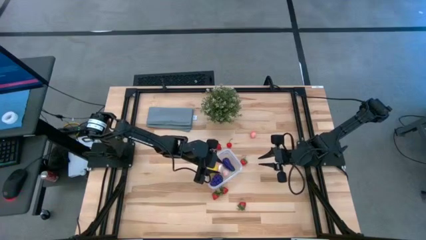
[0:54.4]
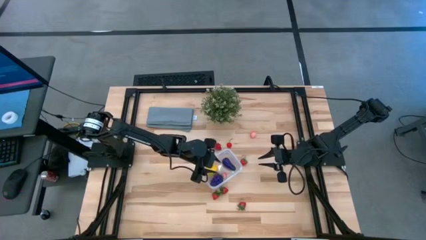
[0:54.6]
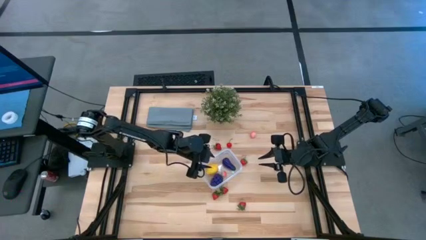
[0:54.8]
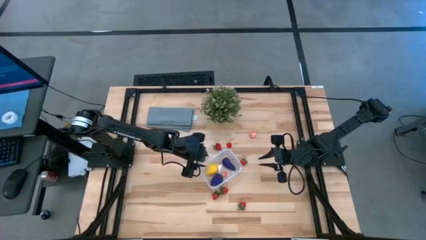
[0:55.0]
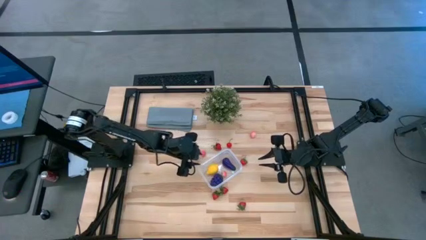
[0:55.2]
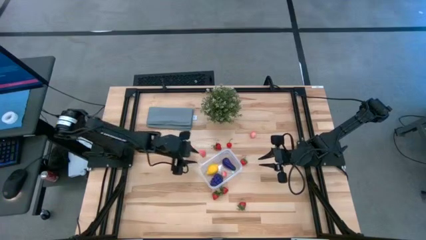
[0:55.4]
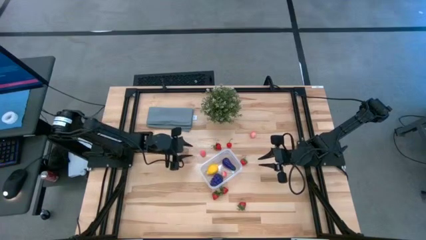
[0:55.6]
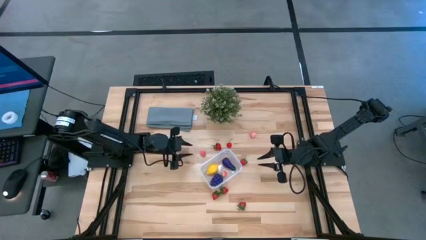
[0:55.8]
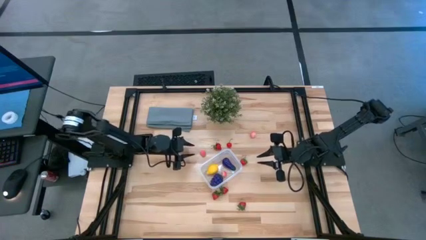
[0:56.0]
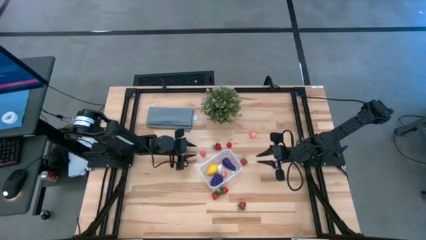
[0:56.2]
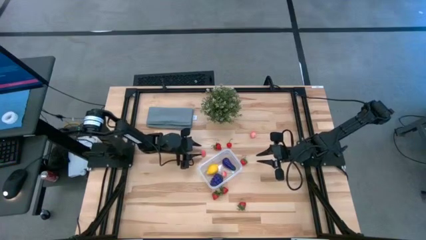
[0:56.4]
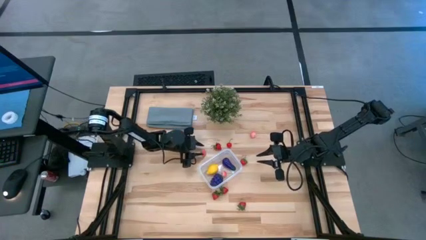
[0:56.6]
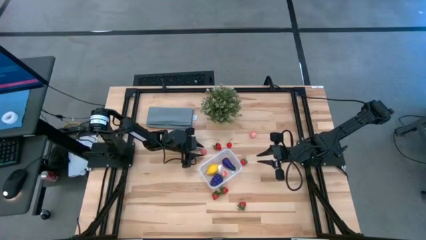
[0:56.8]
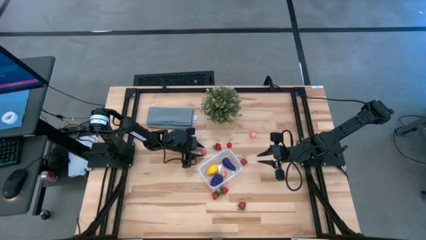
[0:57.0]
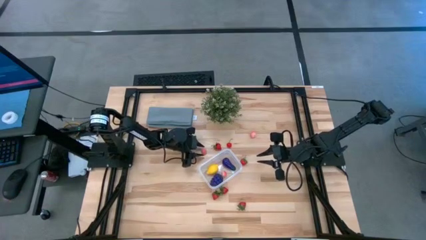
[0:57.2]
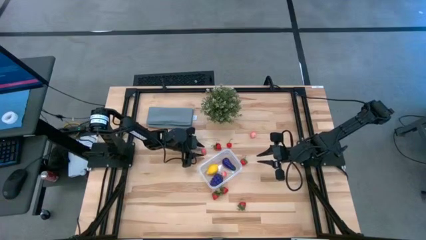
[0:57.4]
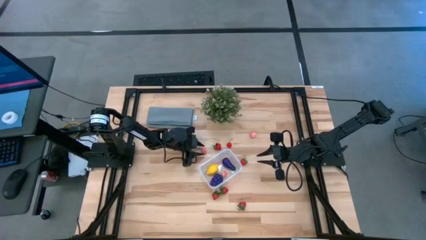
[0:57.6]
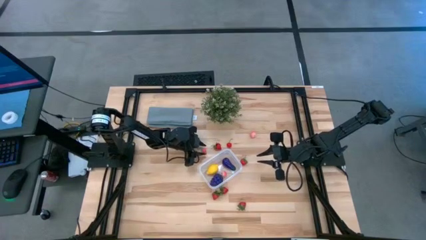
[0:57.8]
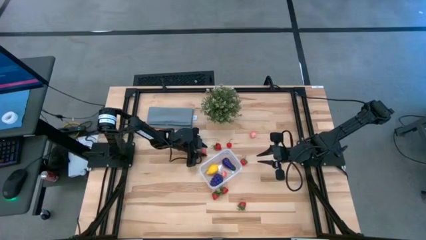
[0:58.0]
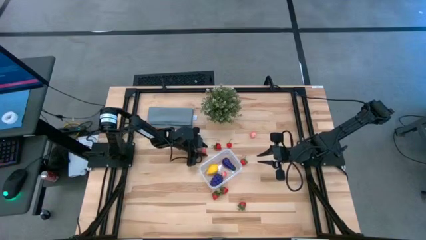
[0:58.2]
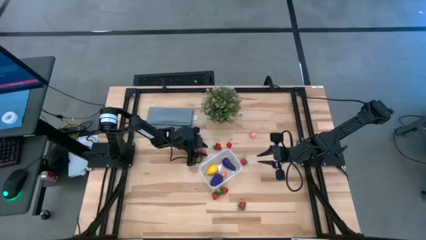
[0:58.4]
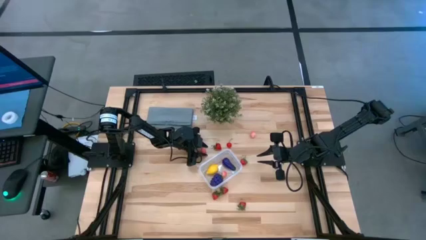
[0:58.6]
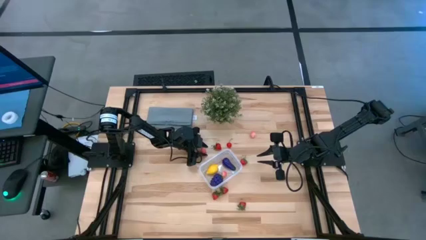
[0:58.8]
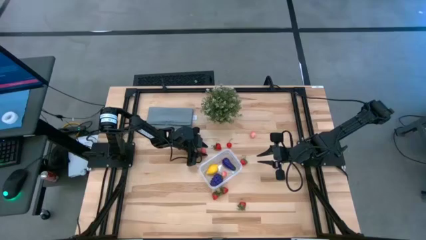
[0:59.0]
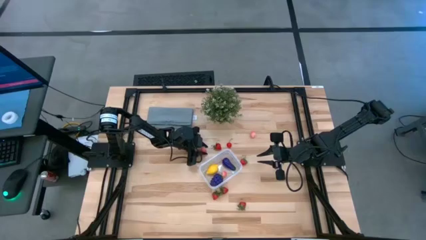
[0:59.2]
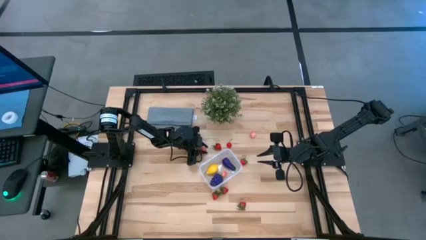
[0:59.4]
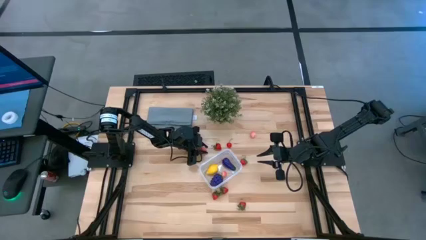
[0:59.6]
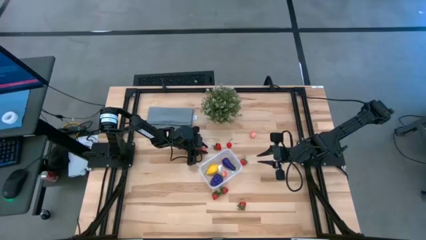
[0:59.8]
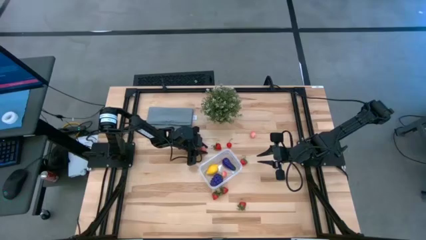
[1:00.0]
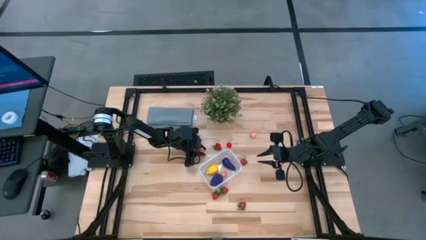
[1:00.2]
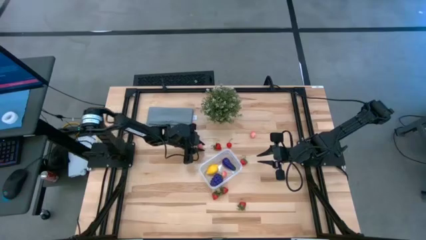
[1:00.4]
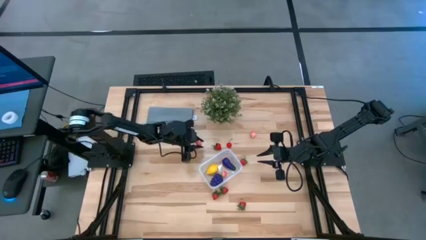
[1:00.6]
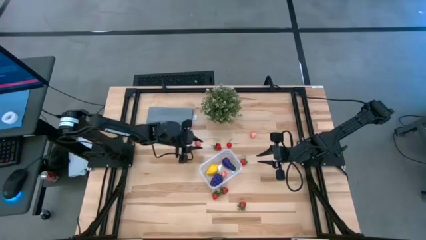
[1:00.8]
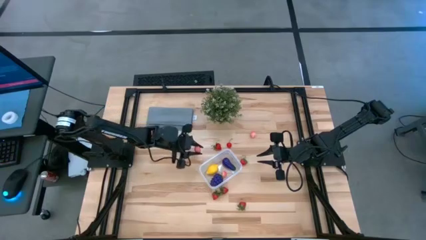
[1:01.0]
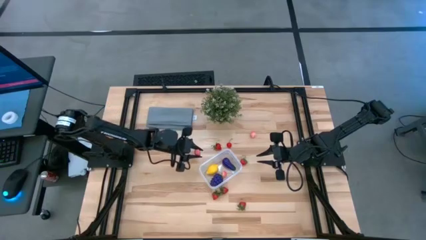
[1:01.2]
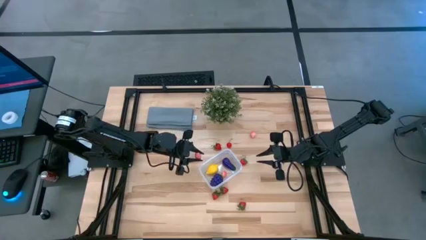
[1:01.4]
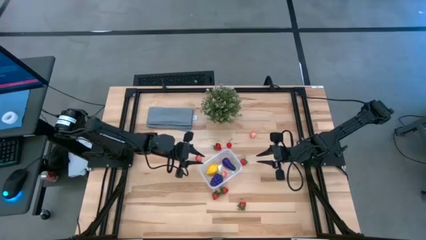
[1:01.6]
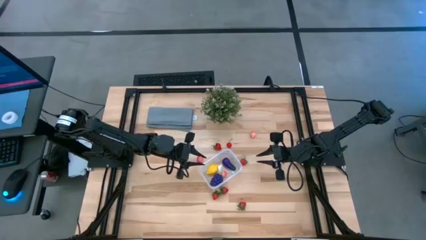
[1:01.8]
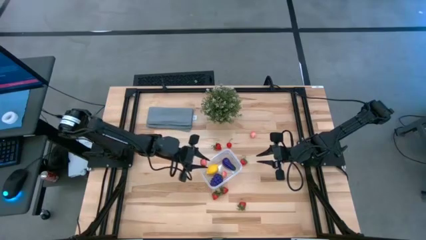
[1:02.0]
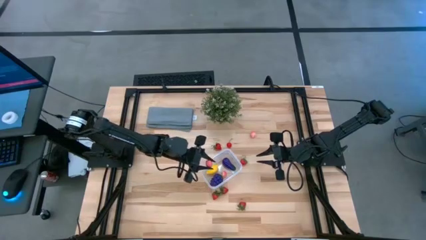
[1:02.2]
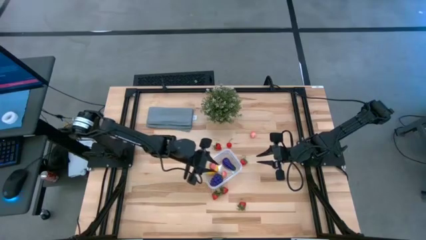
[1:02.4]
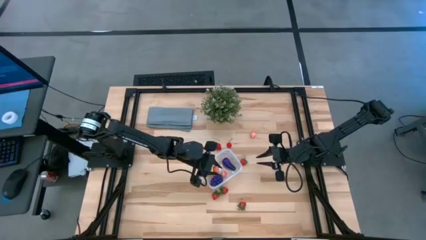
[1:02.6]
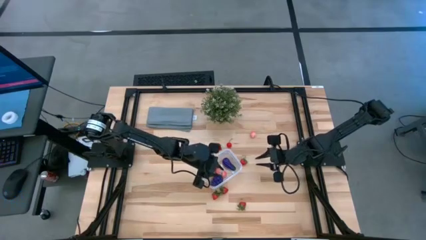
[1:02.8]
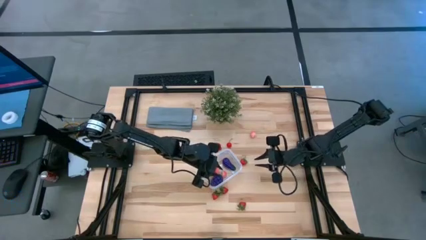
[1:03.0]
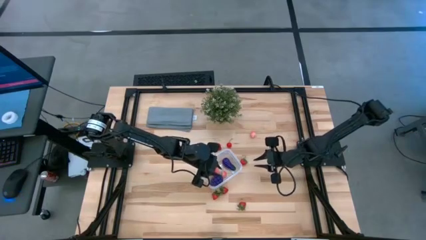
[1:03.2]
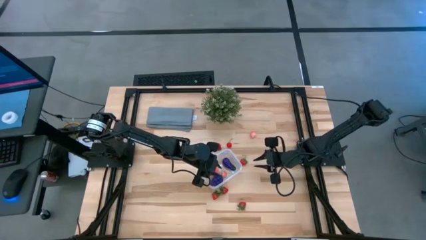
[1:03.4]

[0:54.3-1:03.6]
Task: Pick and placing Produce into tupperware
Put the left peach into the transparent bin

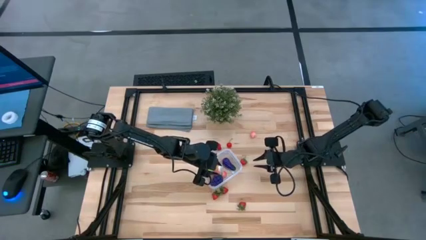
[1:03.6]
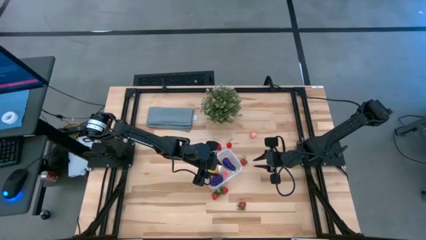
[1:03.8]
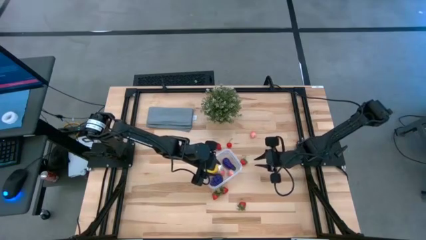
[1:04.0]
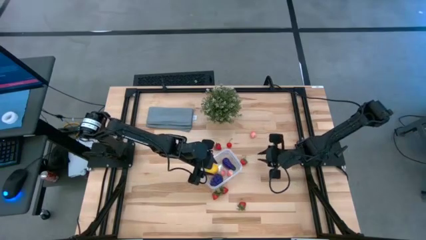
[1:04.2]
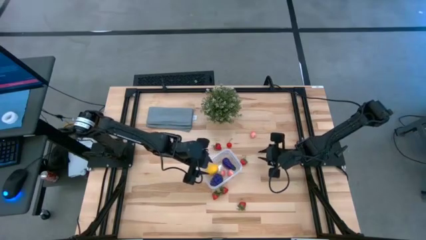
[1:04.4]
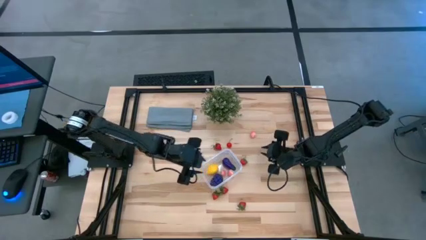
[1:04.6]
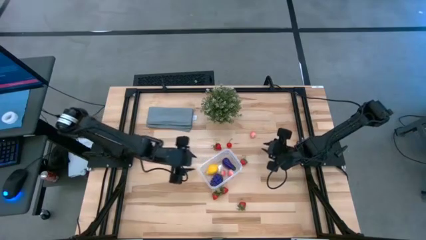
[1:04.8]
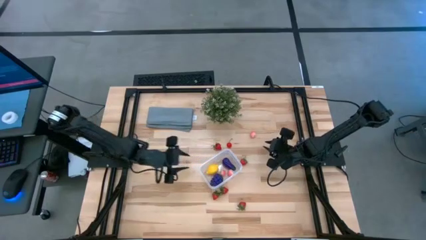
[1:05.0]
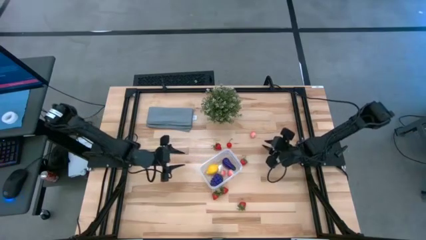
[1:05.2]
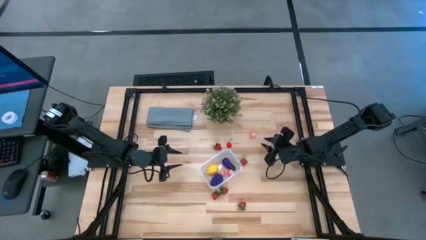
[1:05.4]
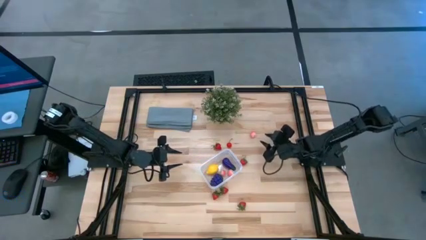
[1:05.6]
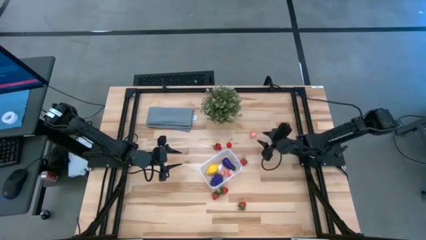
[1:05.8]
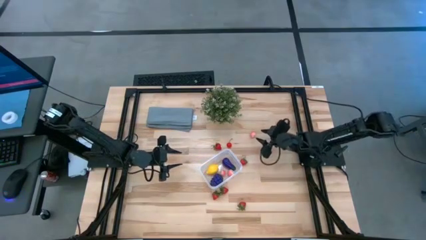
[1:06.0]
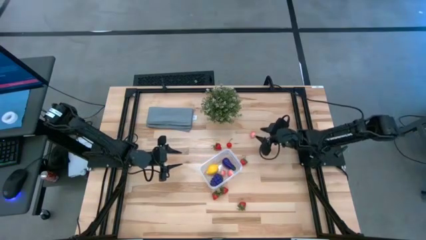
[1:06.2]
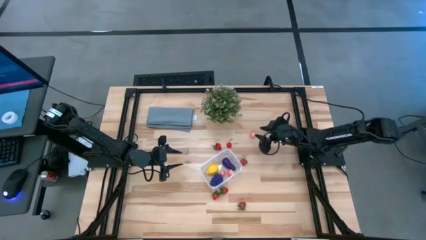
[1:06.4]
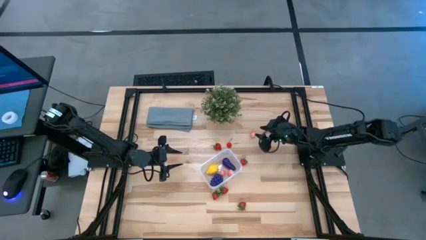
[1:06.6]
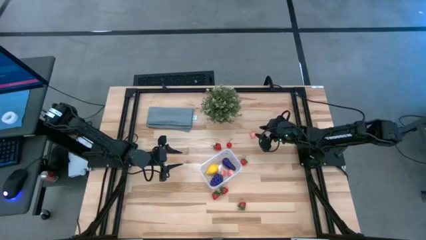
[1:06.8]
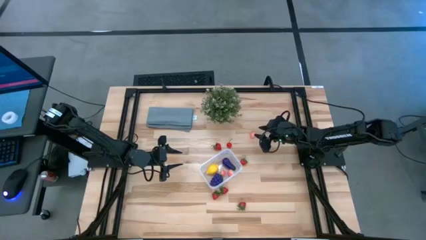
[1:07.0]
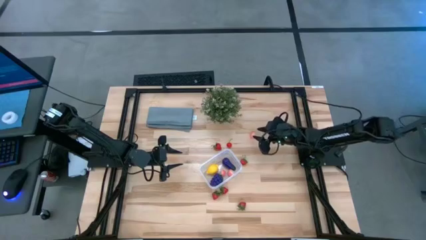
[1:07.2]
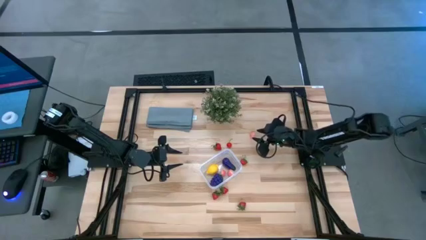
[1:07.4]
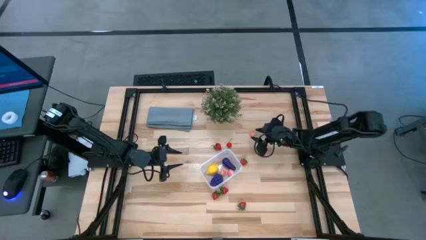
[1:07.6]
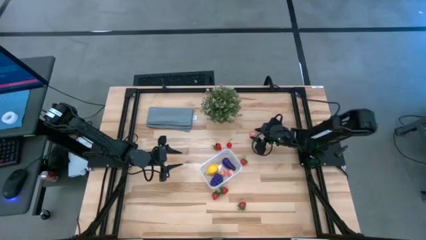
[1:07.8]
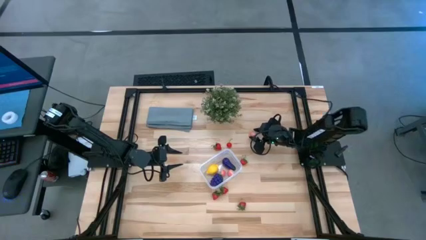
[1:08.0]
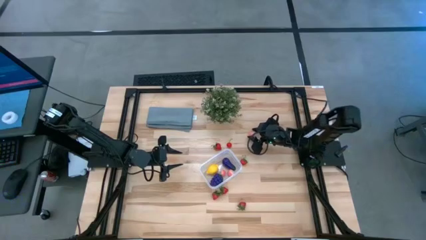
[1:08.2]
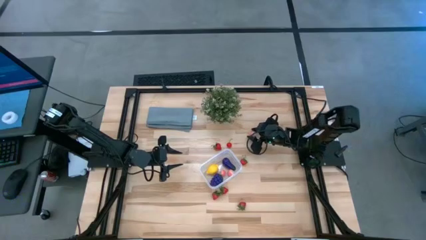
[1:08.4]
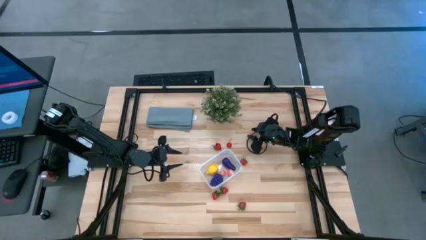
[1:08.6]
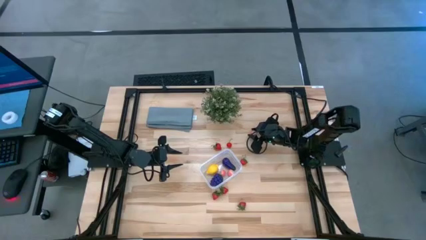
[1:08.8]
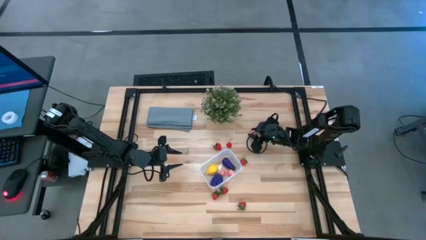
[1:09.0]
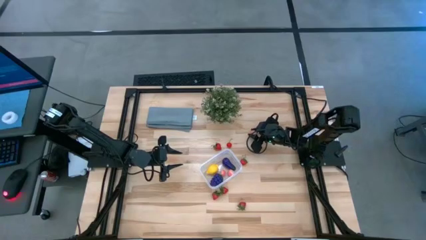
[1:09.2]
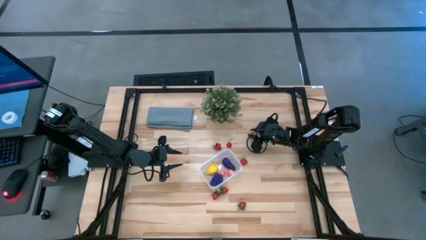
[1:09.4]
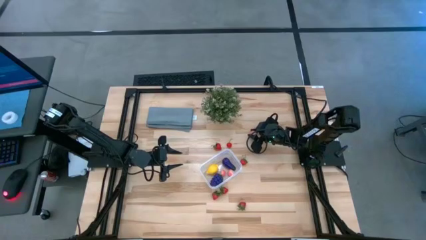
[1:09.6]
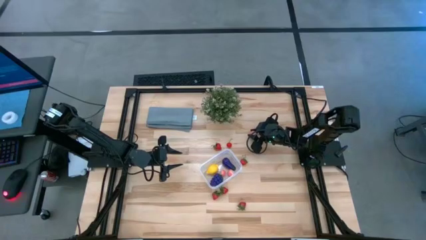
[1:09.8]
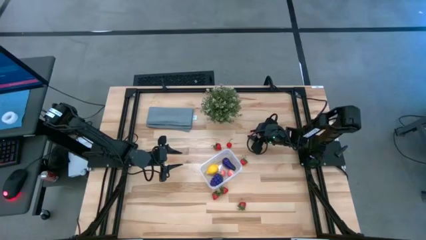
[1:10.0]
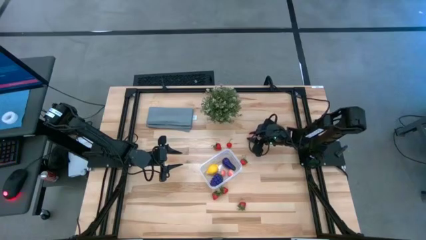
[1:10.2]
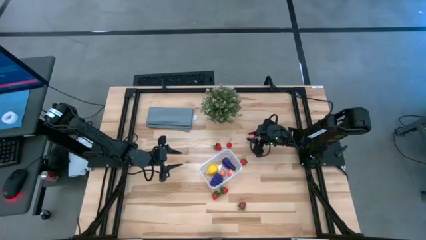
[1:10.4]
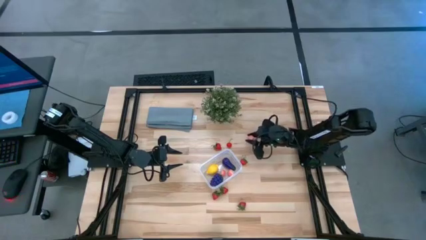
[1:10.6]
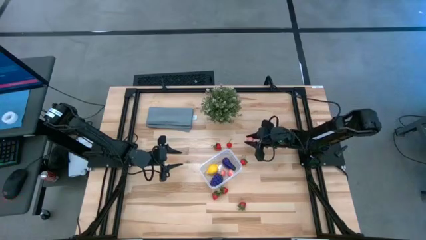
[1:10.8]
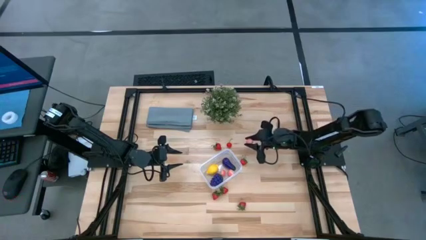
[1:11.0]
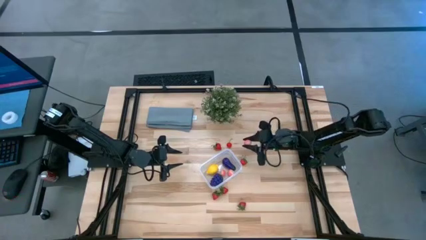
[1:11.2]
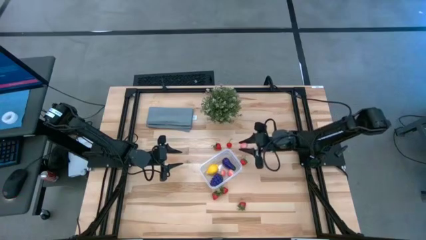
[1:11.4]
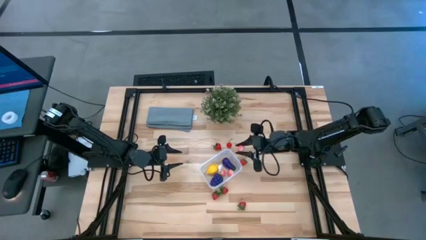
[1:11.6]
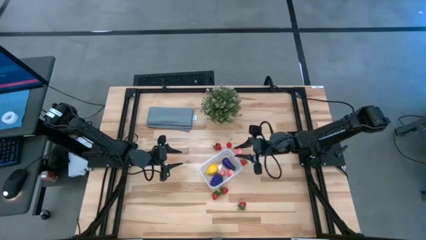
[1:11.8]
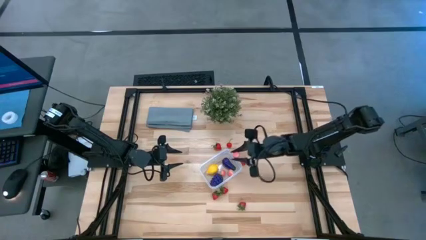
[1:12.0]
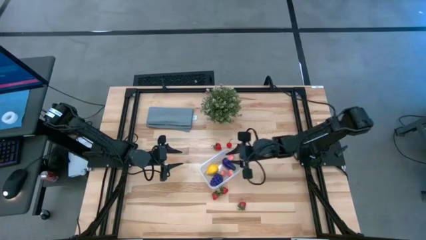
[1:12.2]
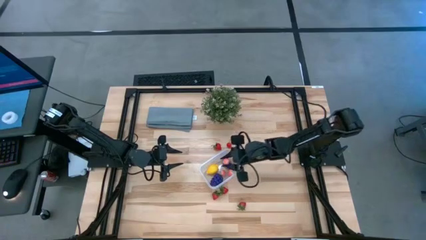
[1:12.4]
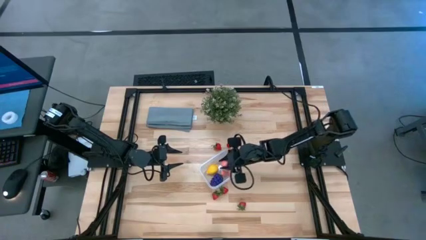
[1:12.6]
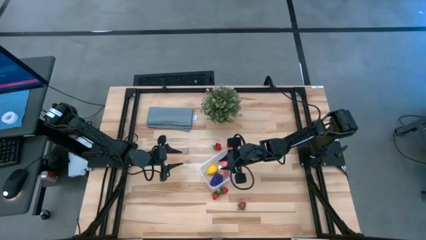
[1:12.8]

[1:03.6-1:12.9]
Put the peach into the transparent bin
